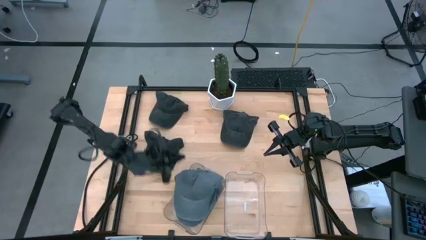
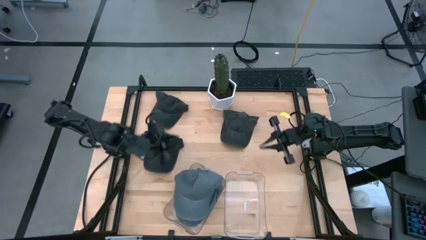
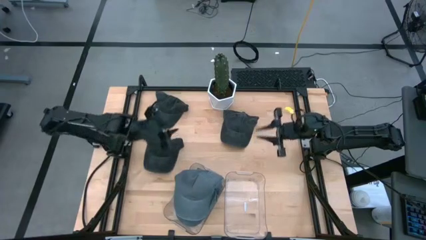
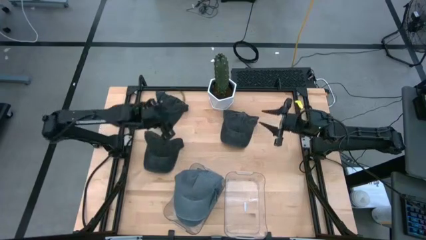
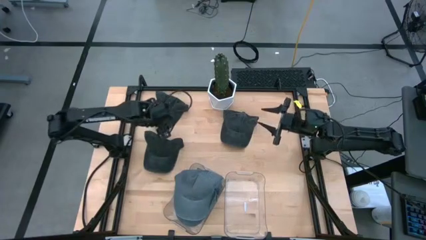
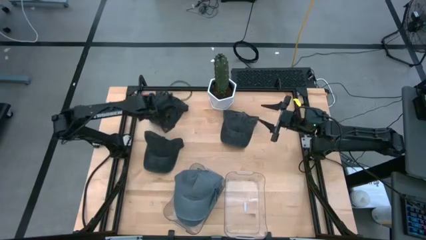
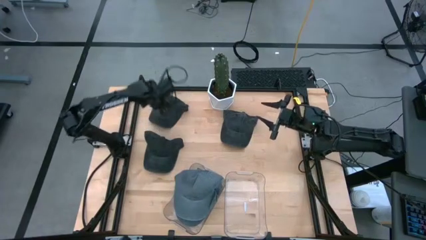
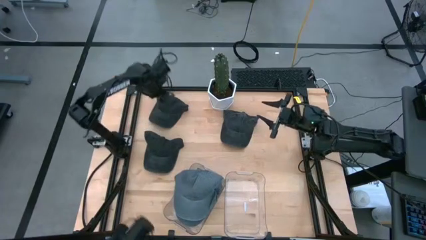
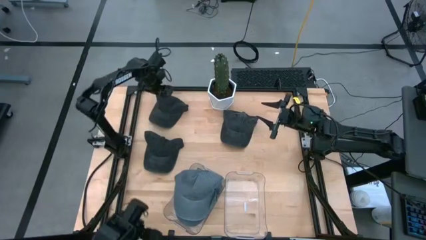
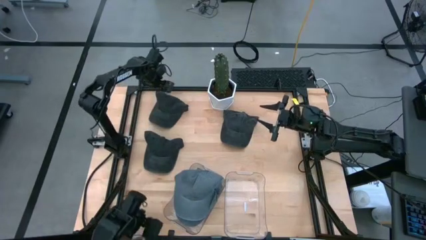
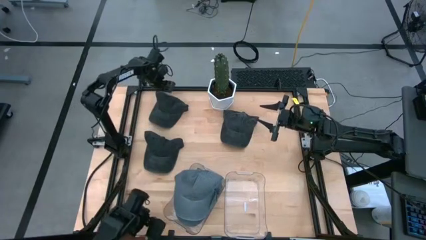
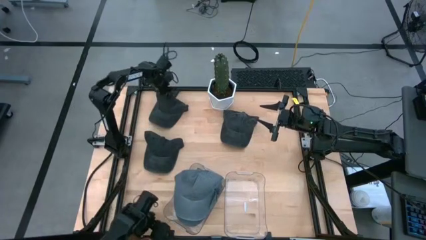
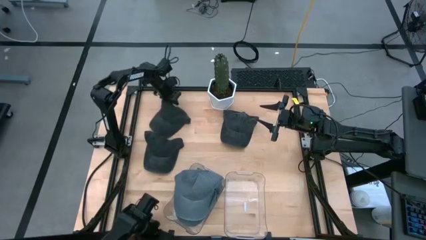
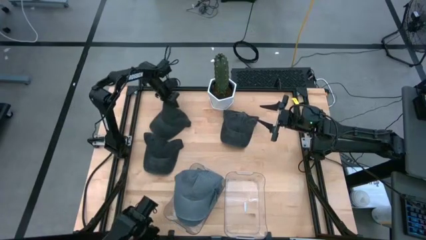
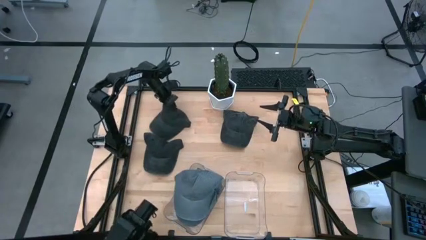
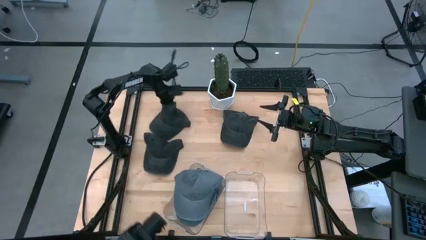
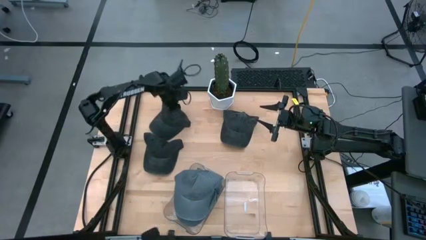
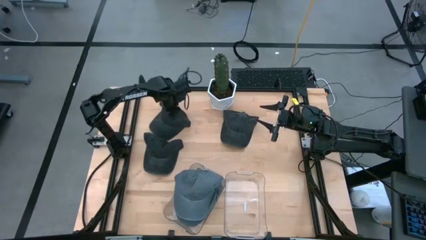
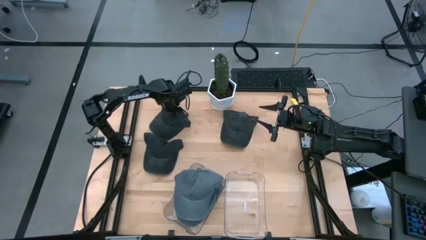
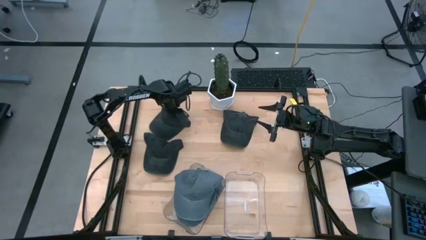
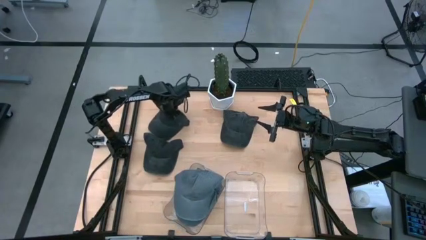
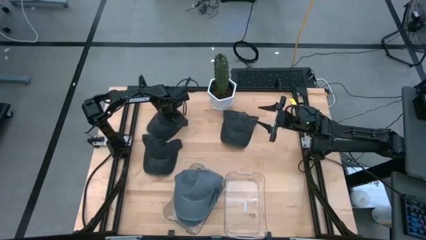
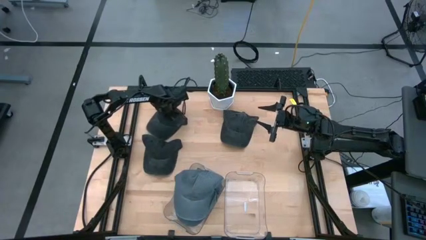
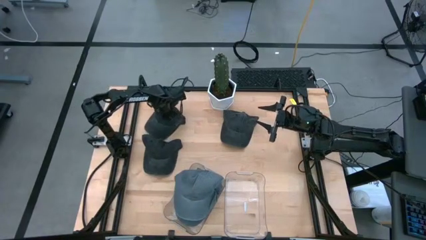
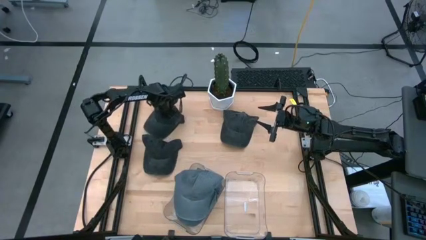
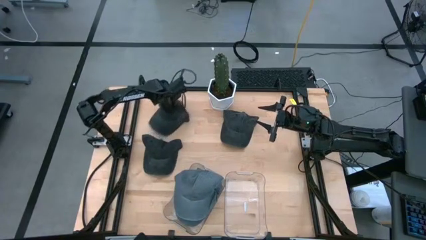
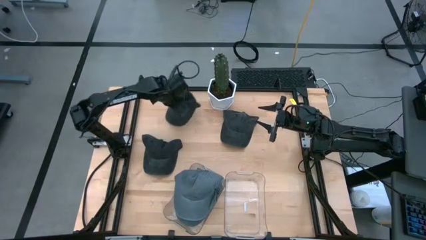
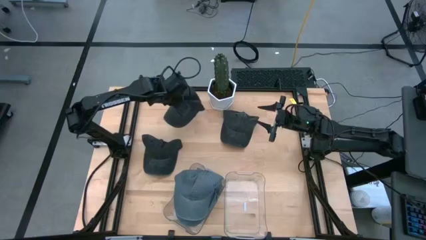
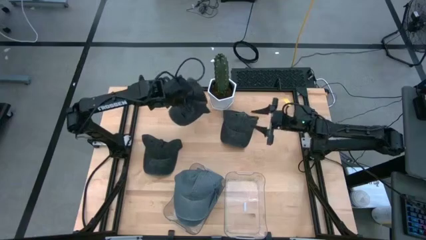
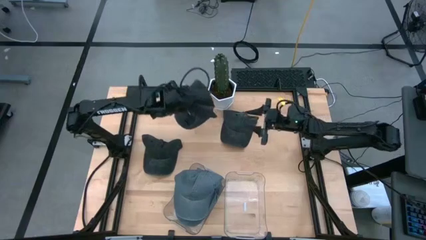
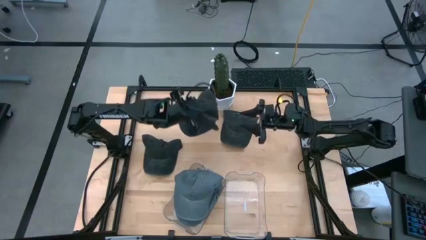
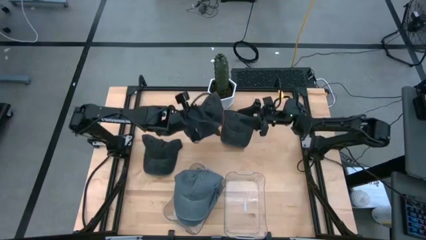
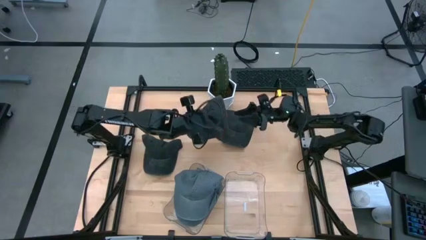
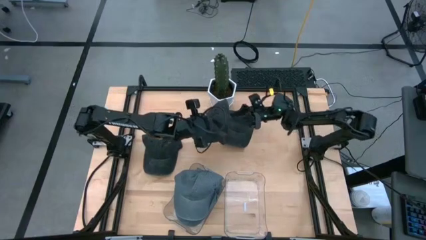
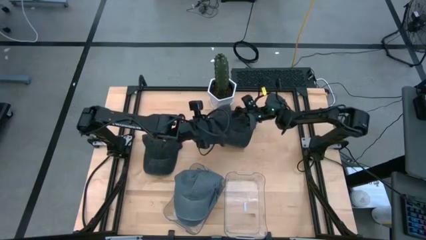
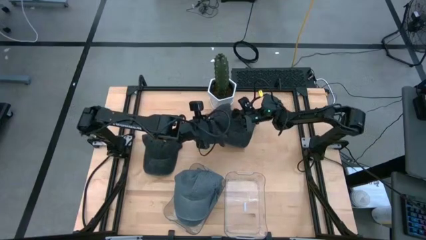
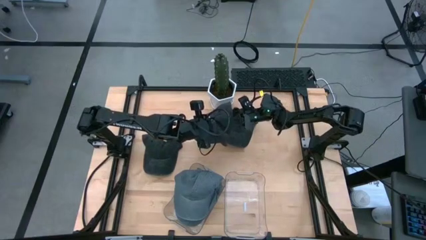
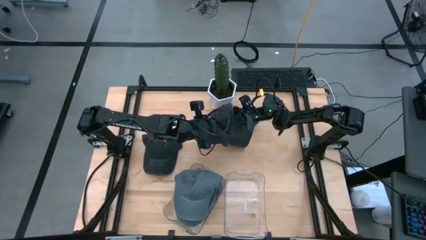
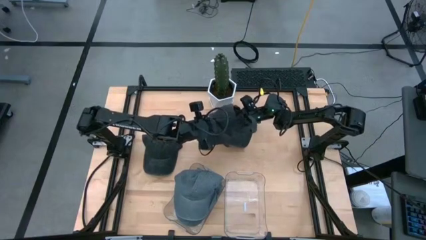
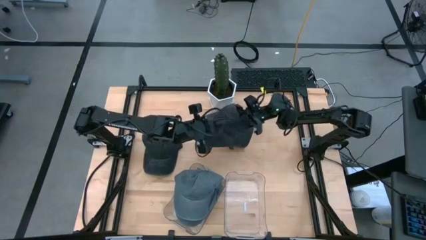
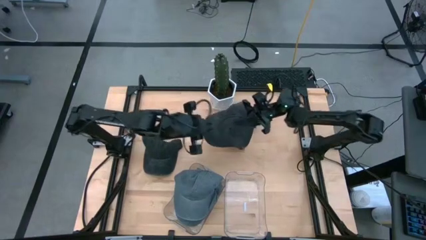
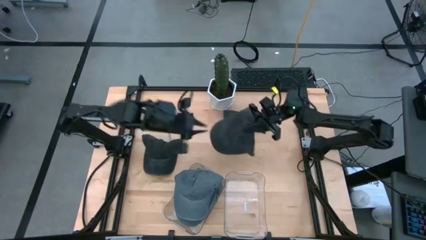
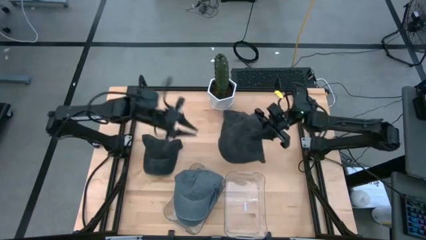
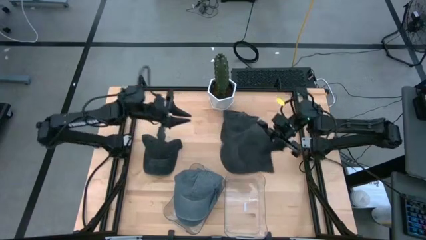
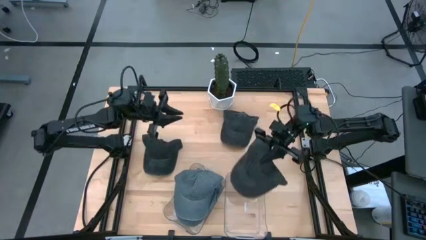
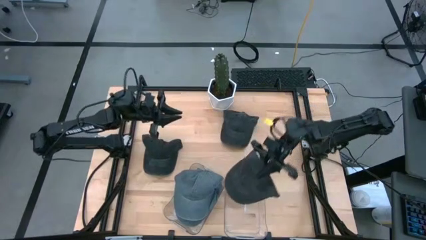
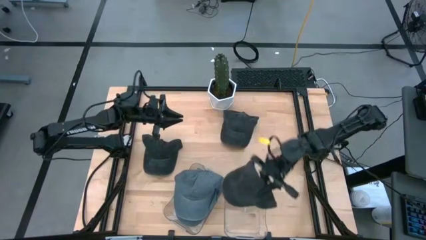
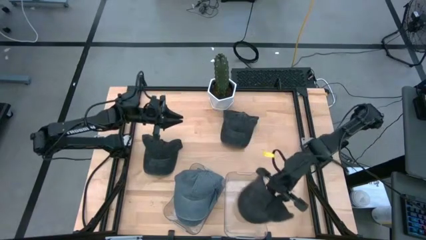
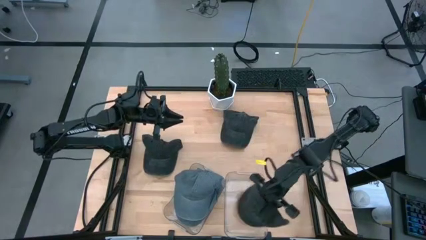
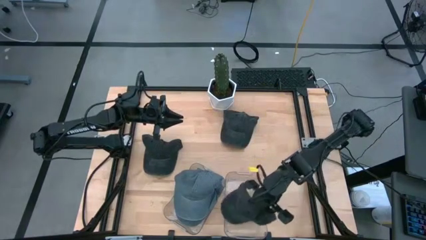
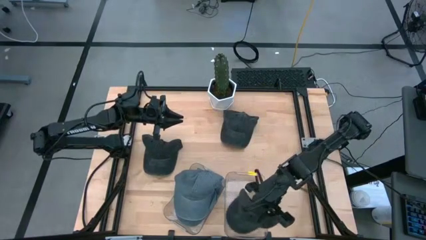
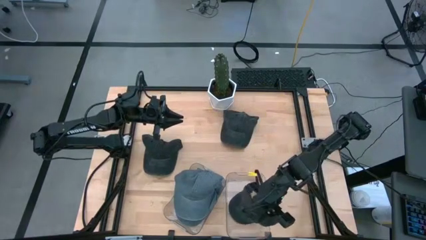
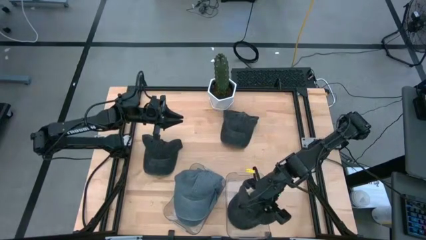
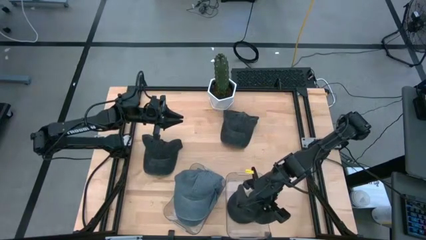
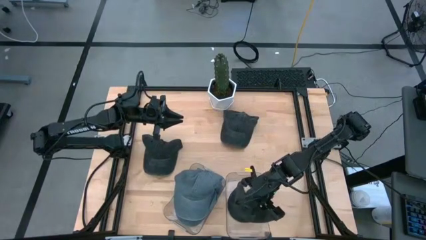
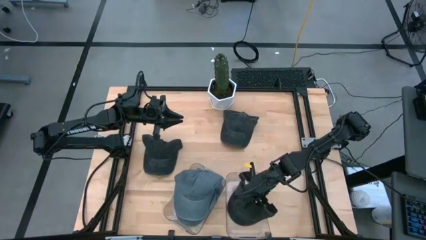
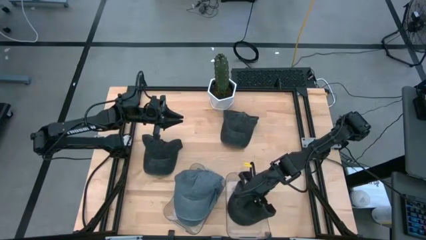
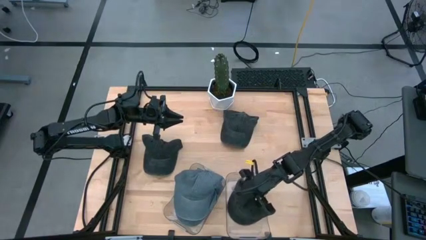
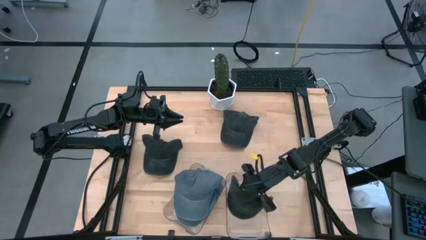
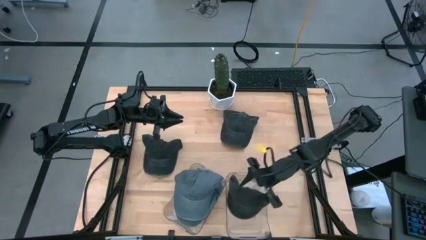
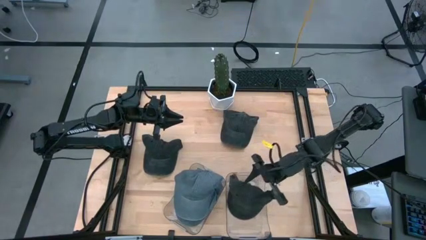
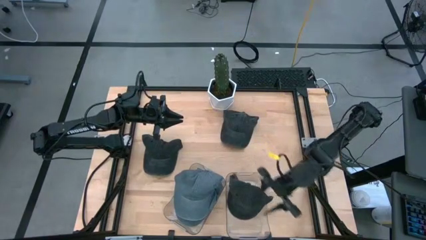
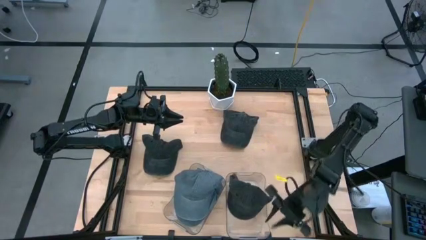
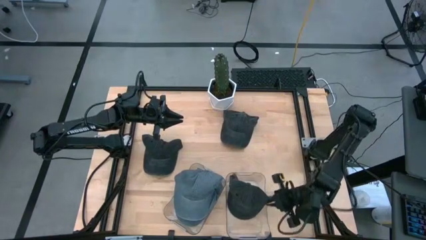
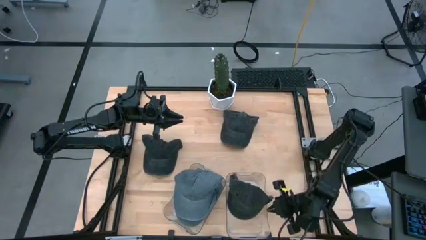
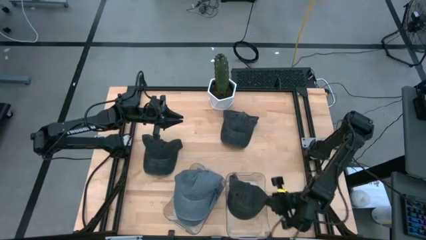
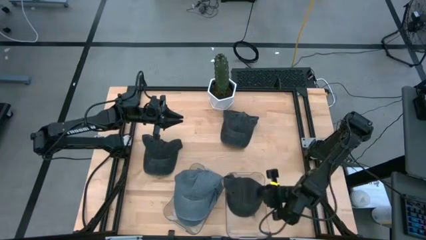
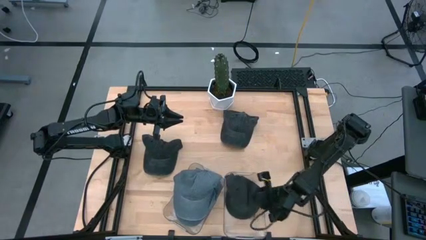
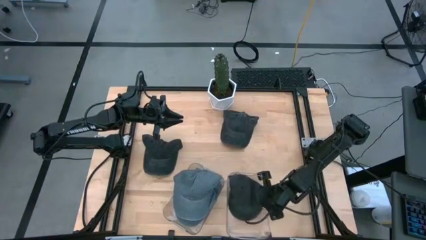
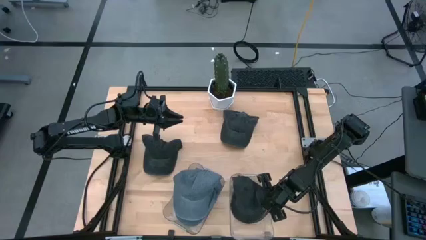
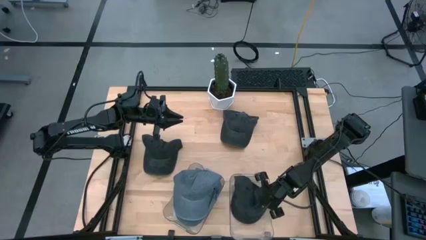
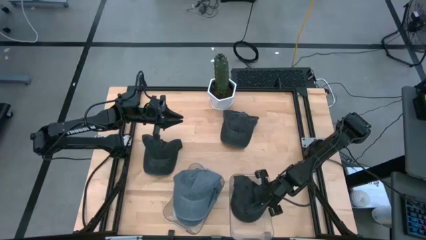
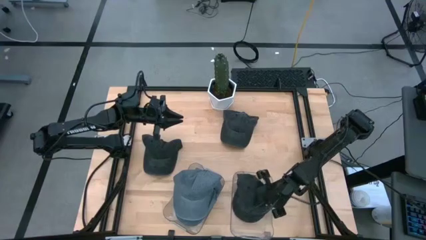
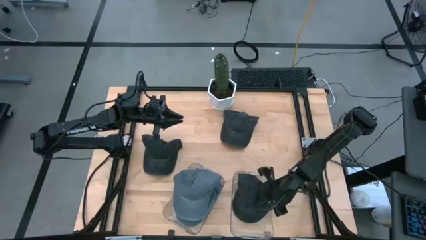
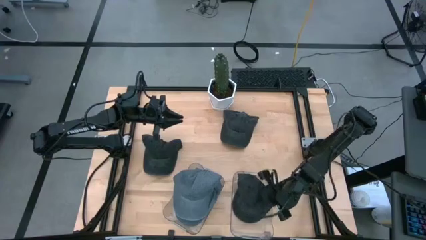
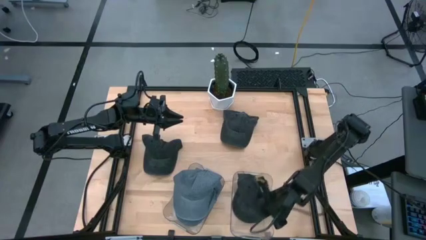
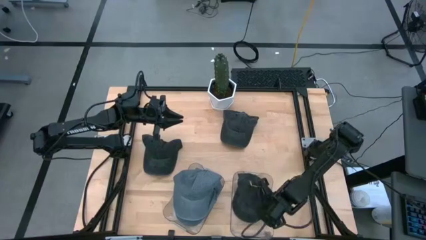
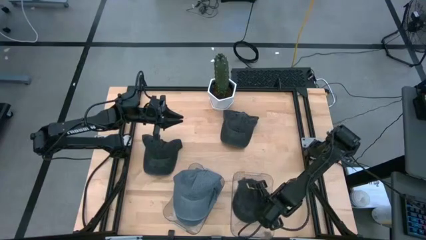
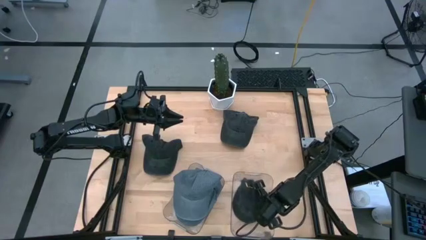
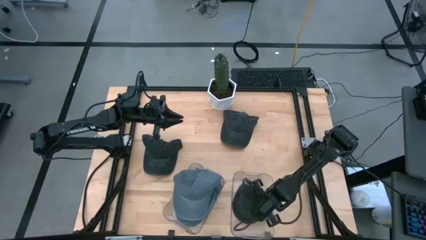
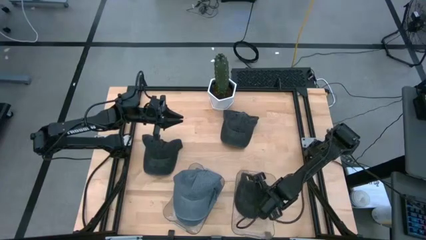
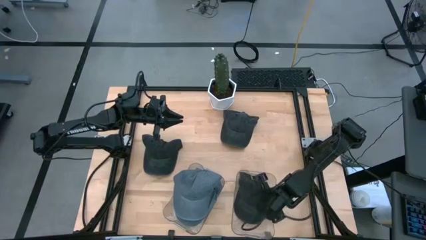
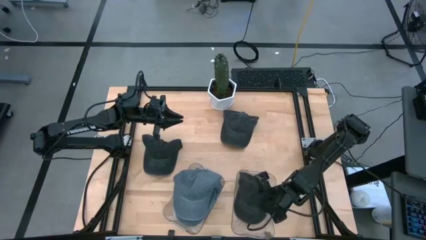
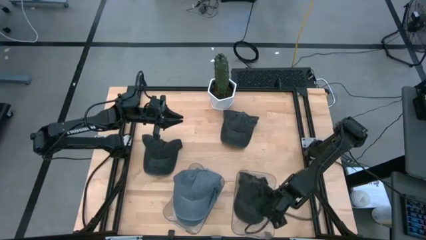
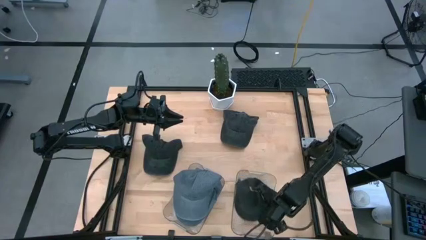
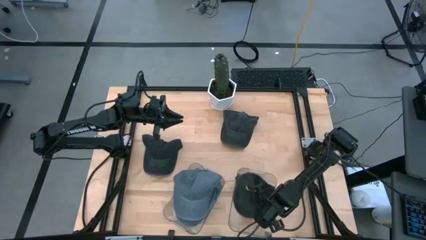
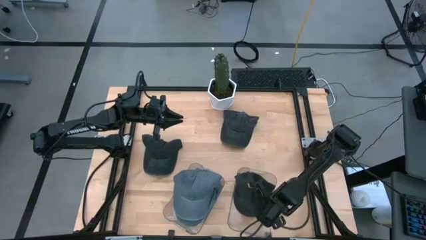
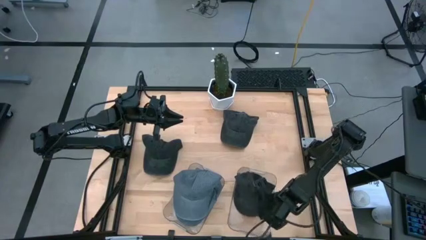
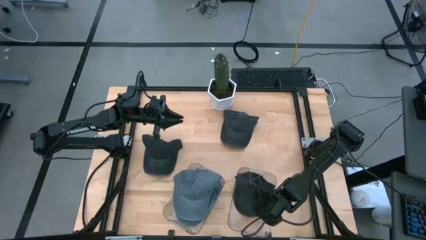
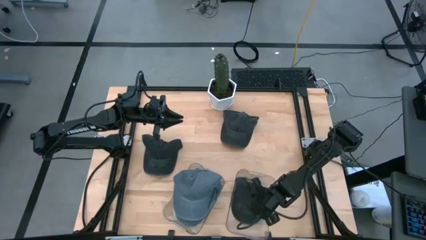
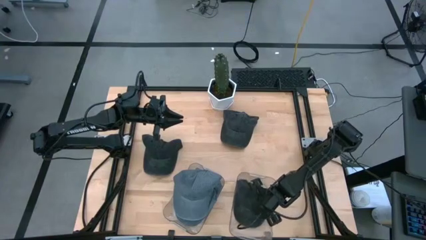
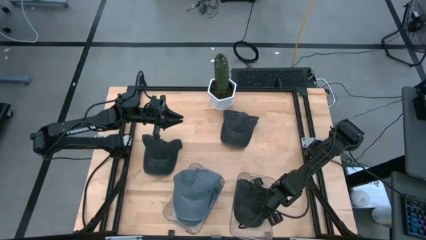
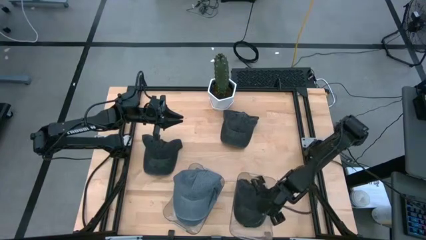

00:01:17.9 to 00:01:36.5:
Task: Pick & Place hat
Put the top left black cap into the right transparent bin
